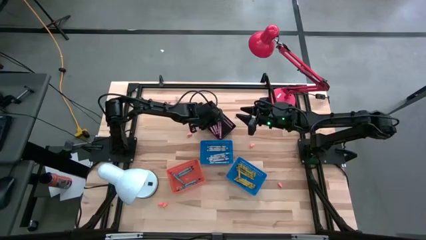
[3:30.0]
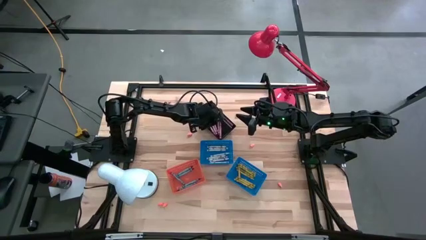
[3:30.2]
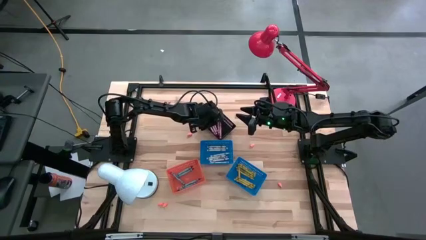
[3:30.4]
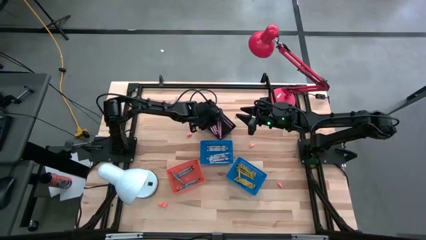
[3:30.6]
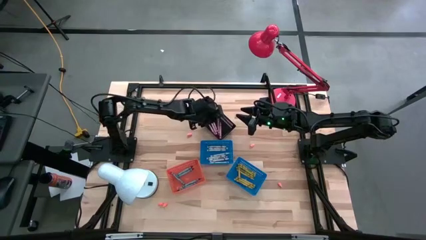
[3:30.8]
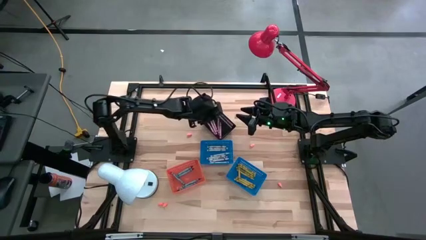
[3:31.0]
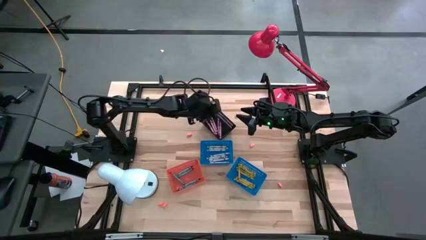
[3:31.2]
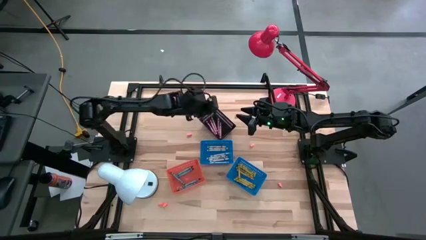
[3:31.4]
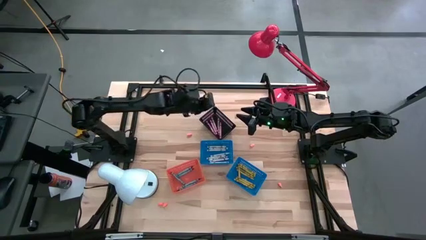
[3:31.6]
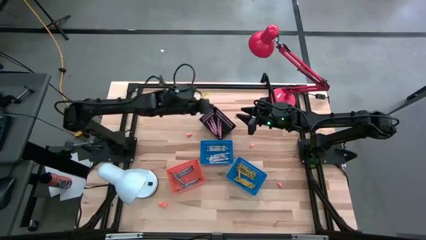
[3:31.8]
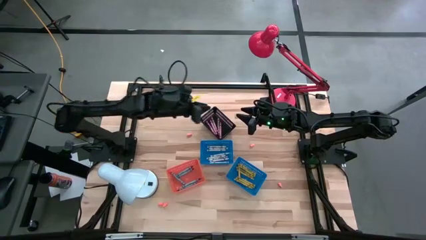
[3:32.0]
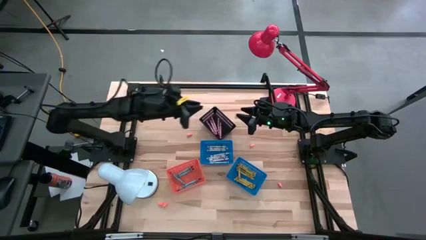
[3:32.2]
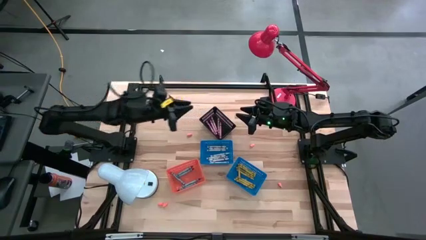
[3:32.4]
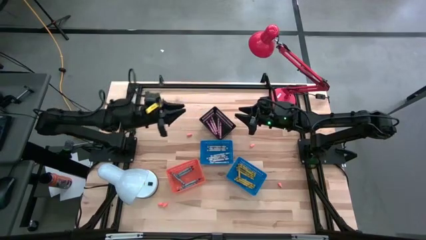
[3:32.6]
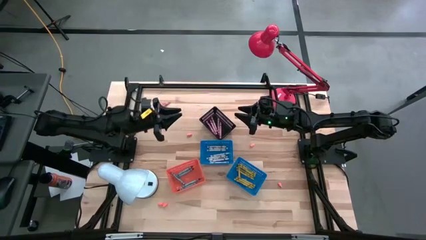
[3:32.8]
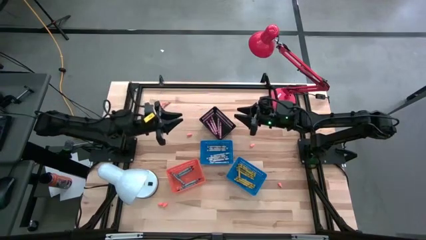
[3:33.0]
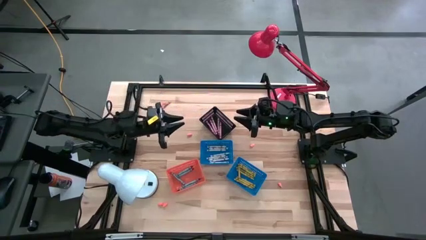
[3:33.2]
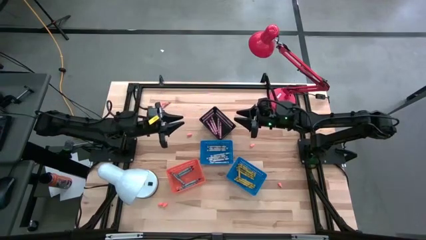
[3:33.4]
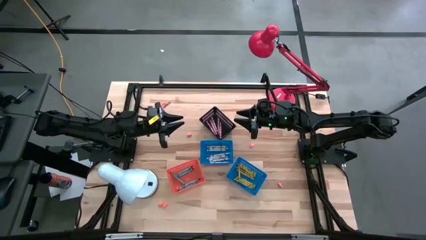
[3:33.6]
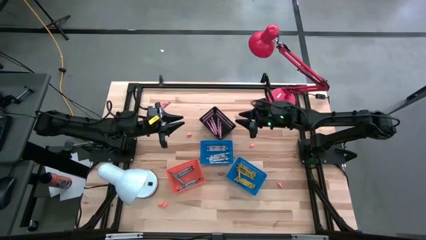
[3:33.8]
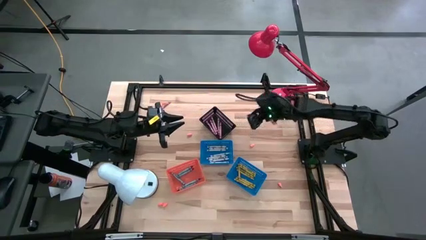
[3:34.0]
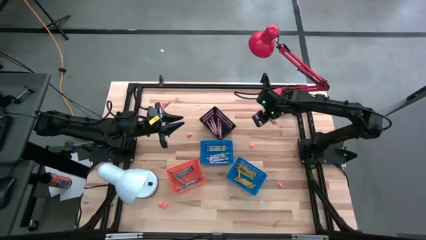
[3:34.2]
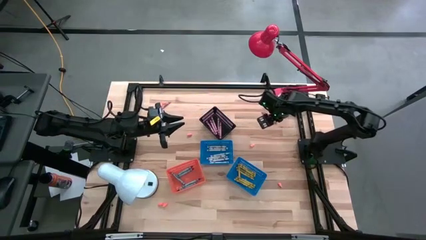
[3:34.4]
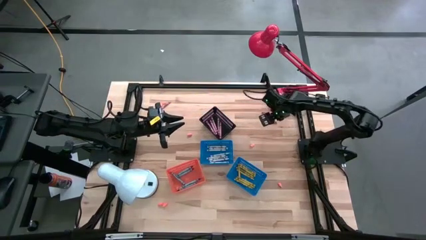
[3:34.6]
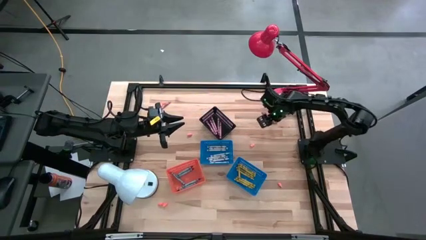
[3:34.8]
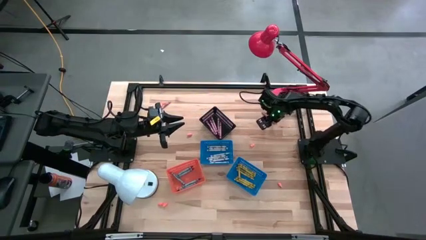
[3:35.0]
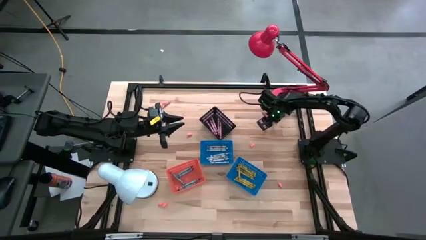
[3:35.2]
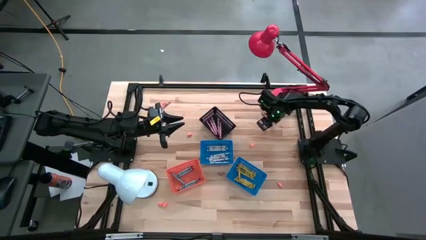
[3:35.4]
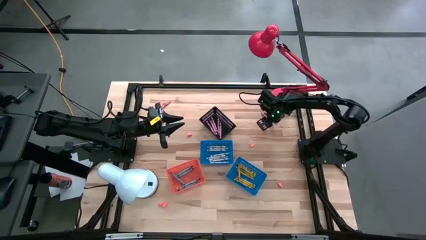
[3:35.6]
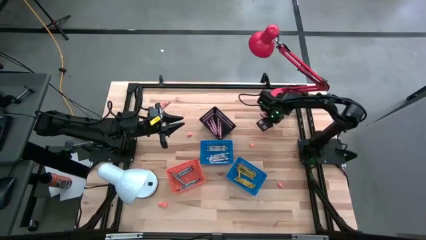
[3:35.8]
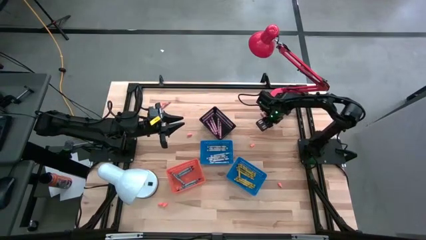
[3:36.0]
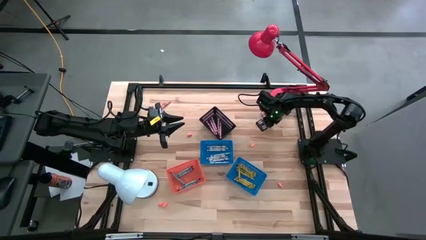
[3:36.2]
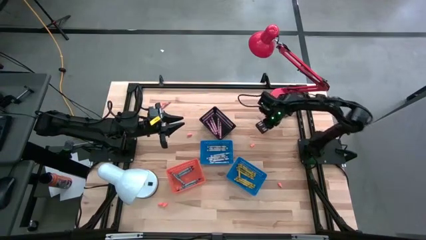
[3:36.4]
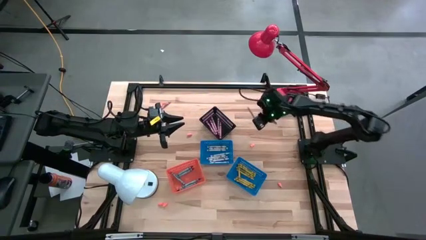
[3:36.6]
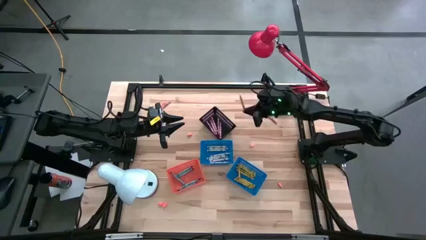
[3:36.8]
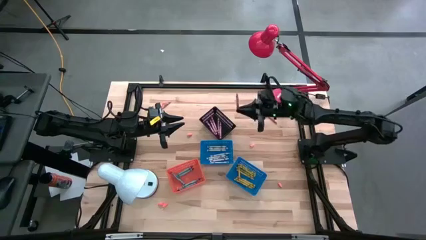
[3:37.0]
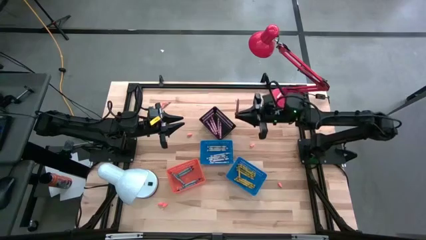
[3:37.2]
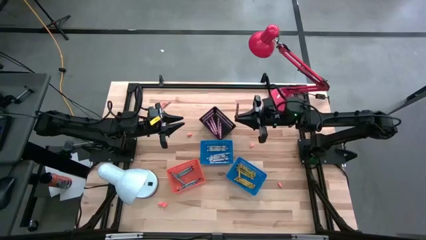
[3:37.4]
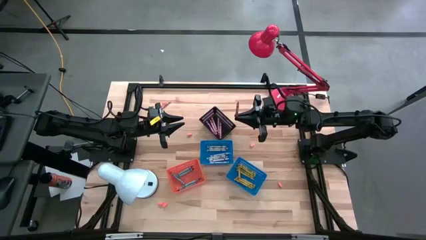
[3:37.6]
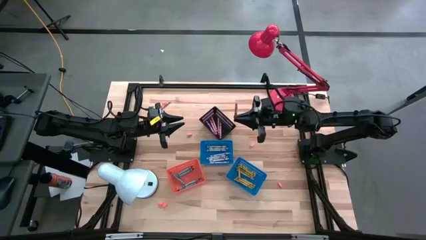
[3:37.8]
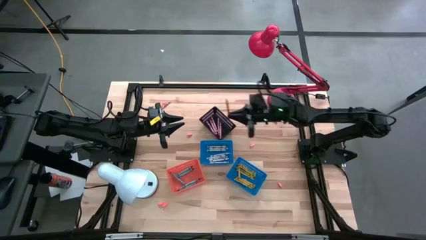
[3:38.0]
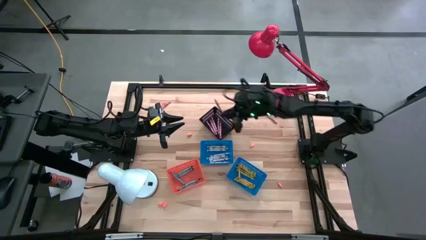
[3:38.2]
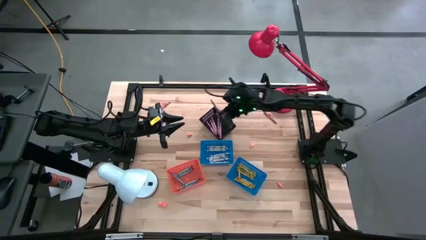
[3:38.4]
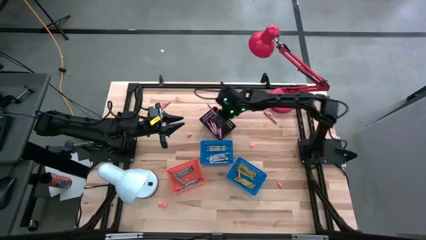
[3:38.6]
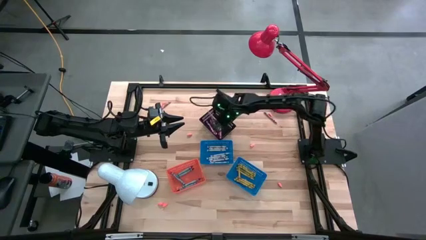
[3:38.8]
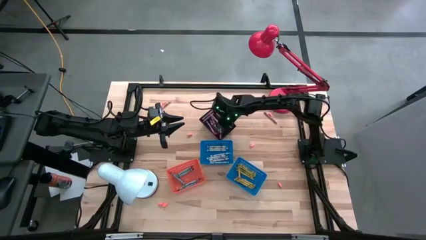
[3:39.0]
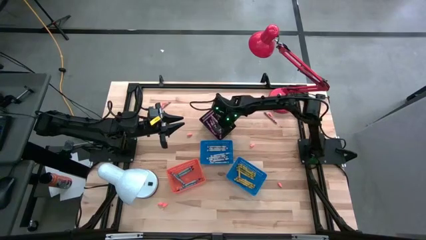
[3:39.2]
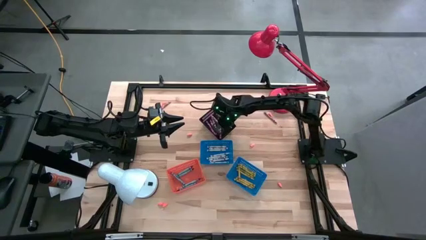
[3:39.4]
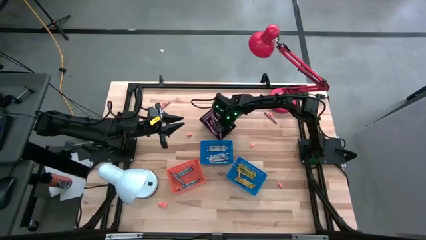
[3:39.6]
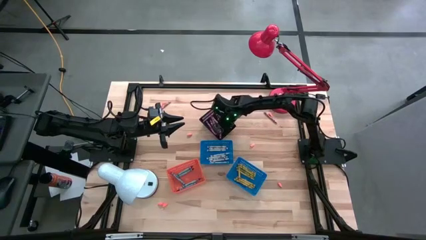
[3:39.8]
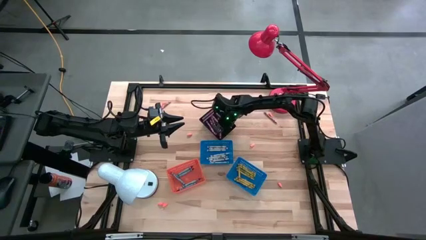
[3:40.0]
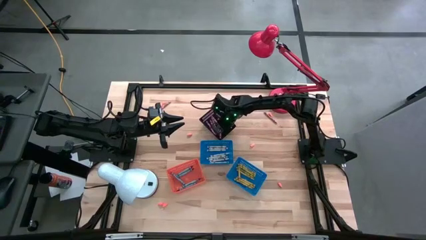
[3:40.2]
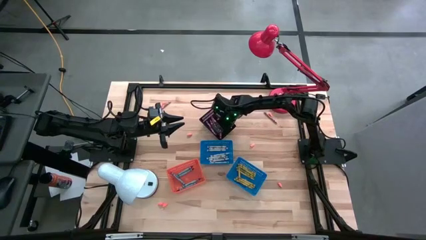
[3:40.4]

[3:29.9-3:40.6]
Task: Sort crayons
Put the pink crayon into the black bin

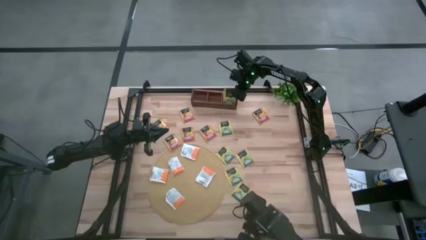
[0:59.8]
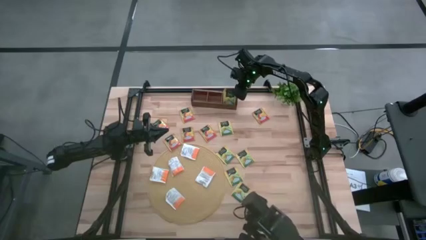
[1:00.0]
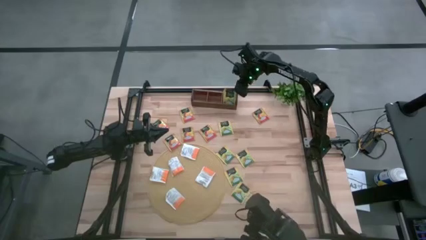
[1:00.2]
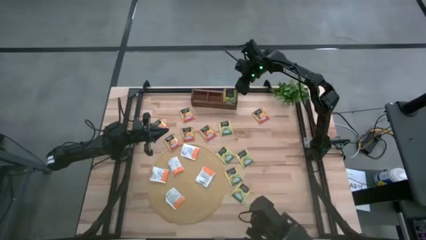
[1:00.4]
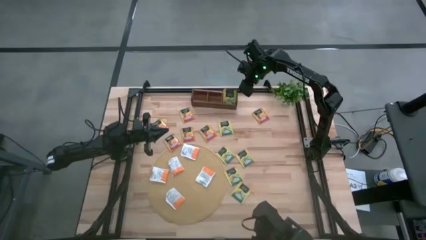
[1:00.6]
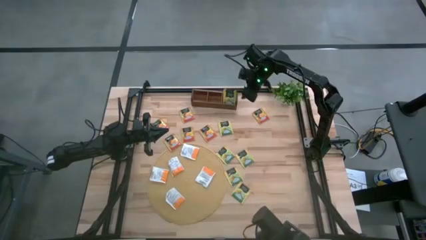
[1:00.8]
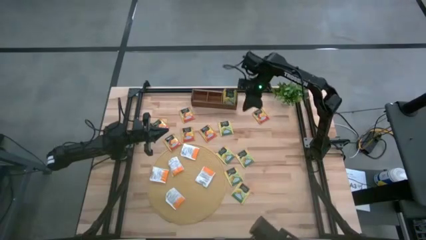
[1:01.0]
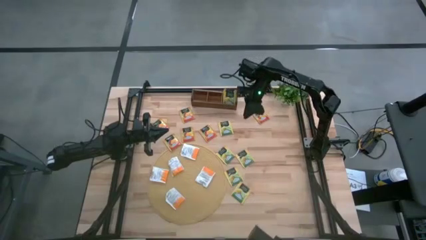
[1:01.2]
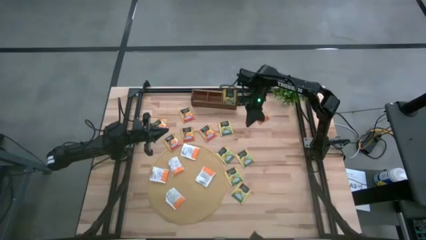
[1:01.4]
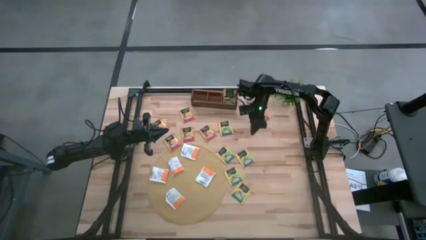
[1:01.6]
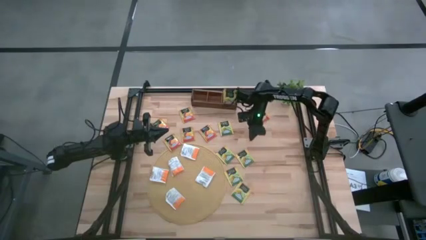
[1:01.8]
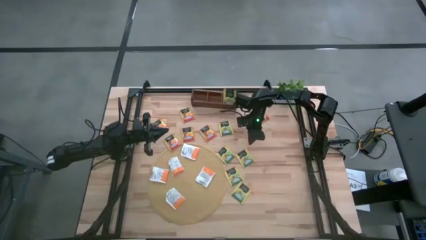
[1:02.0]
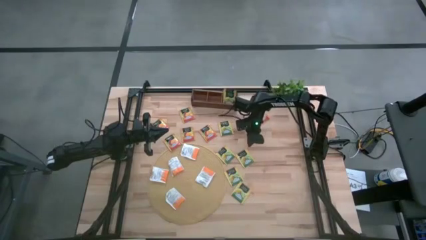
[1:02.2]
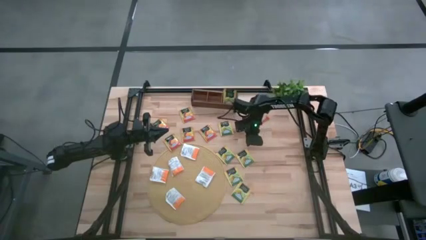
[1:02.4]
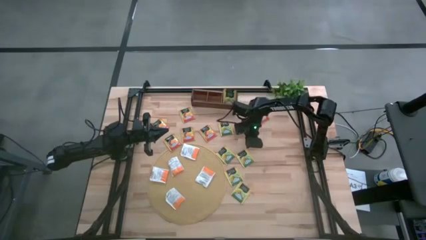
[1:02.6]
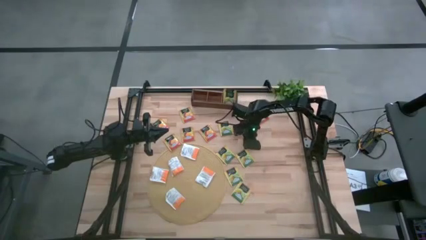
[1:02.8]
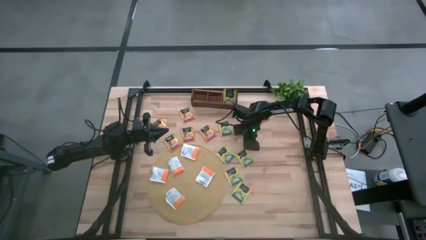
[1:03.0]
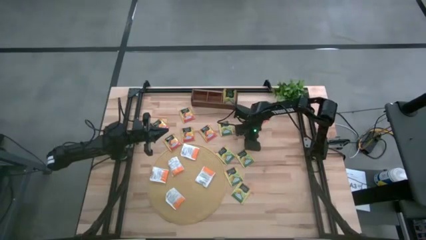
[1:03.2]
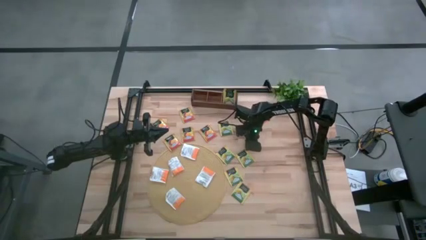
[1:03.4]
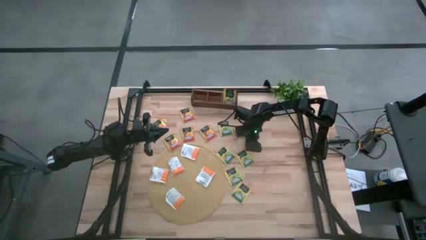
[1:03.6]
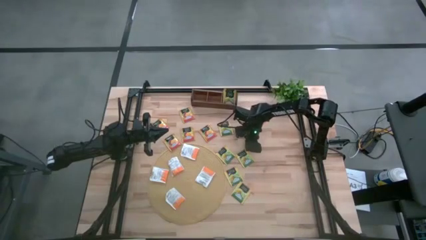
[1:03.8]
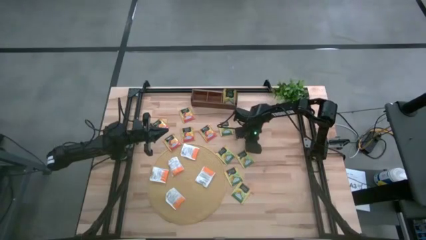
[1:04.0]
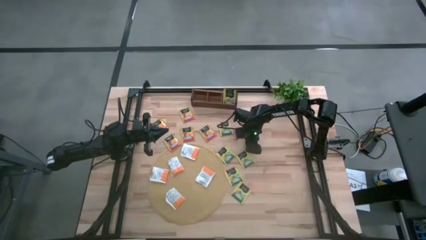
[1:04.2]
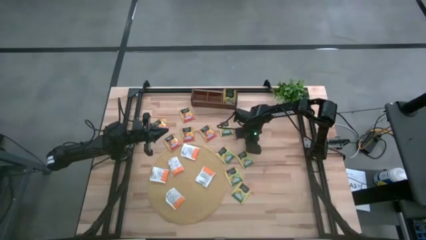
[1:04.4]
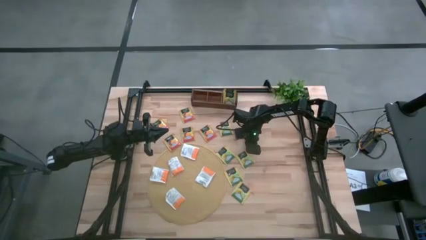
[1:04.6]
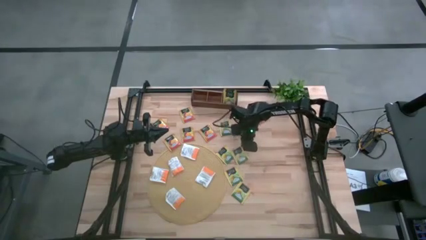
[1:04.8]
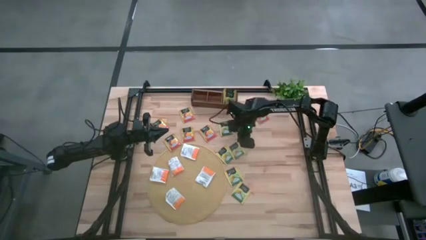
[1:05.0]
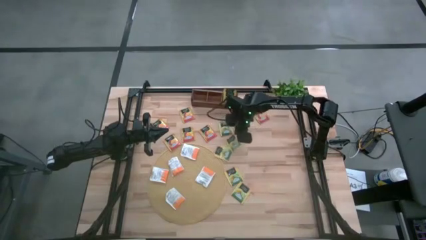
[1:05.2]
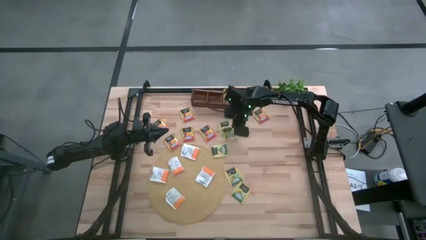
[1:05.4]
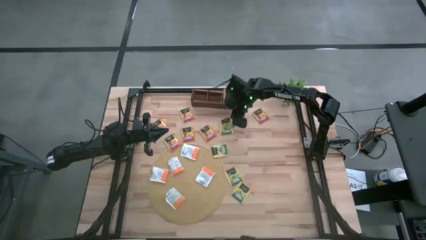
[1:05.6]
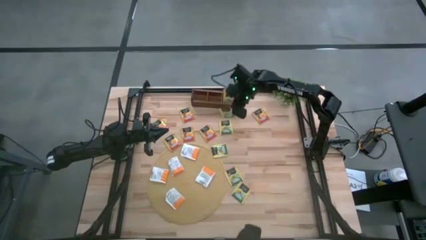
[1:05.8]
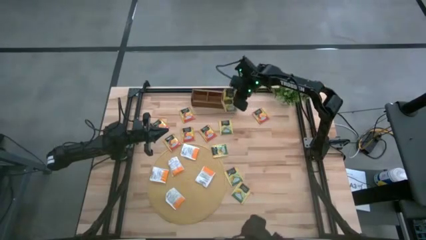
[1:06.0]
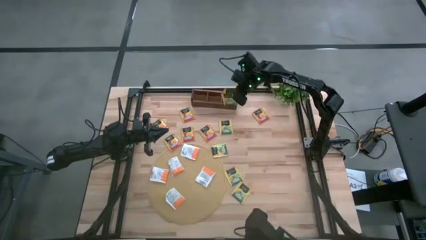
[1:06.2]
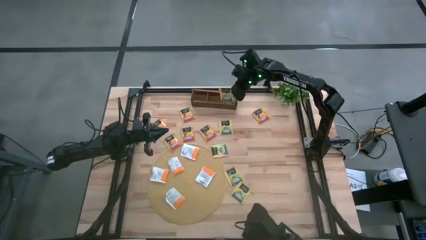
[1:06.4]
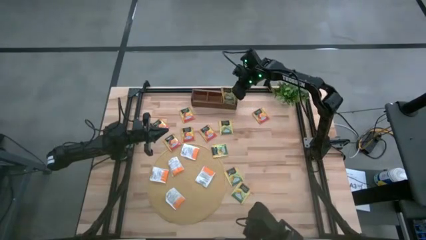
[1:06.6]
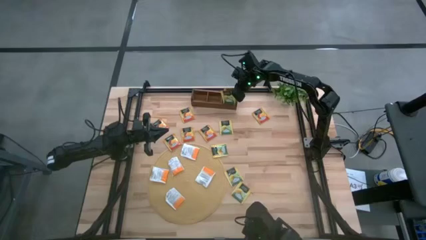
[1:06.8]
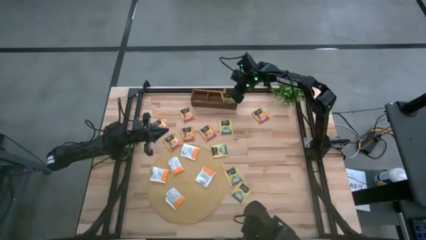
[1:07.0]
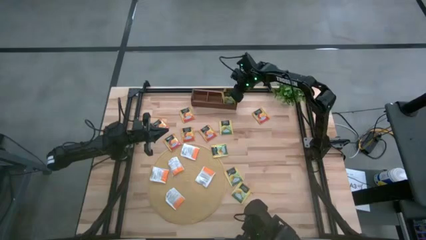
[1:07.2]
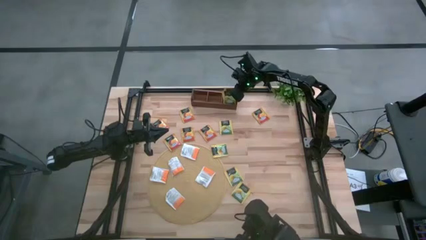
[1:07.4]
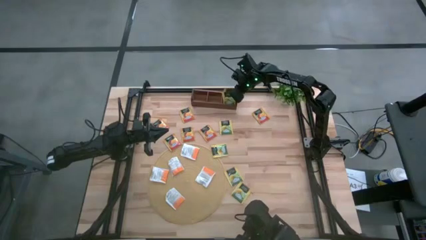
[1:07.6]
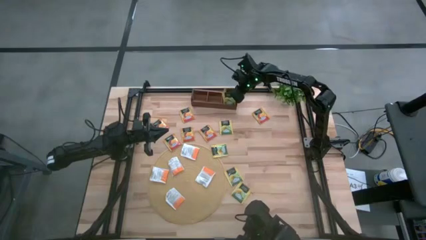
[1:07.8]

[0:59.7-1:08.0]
Task: Pick & Place Tea
Put the green tea bag into the right slot of the wooden organizer
